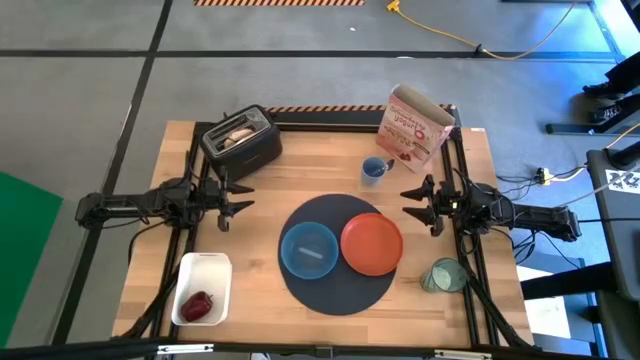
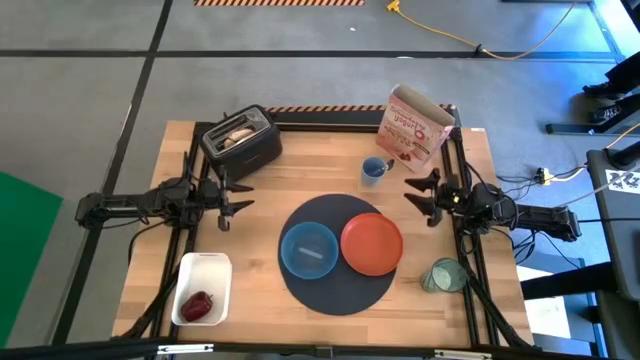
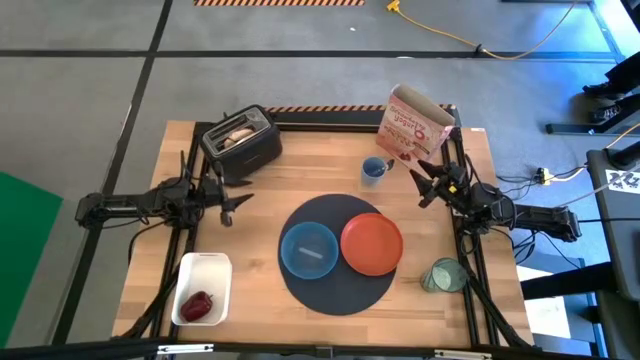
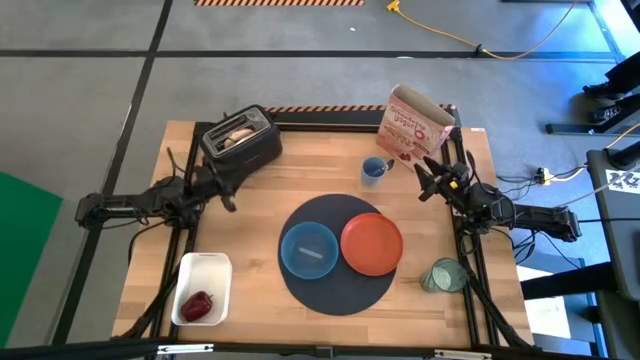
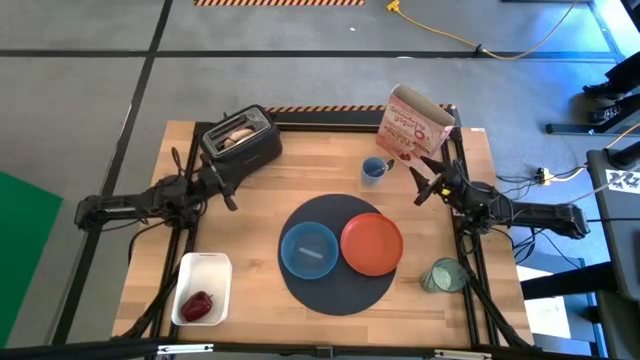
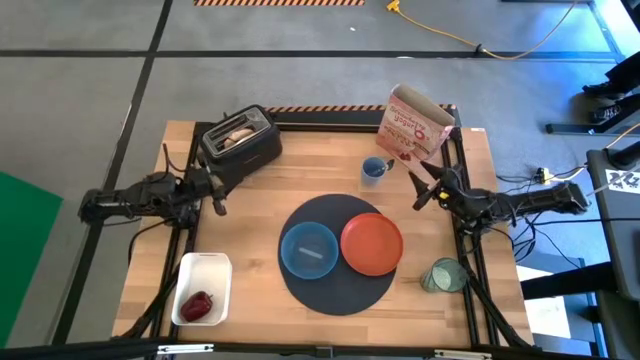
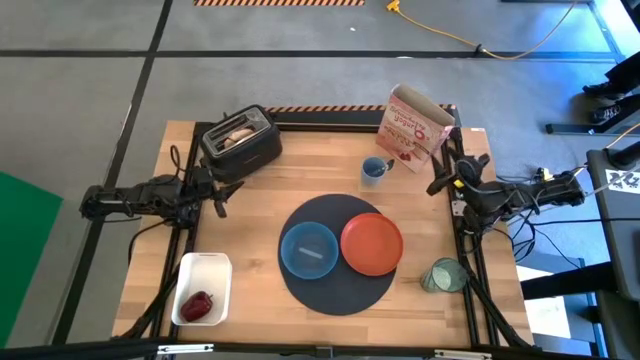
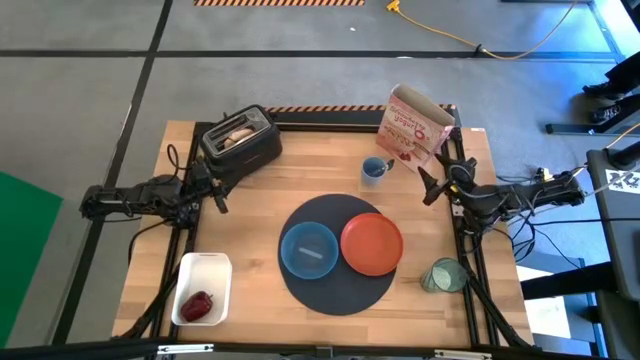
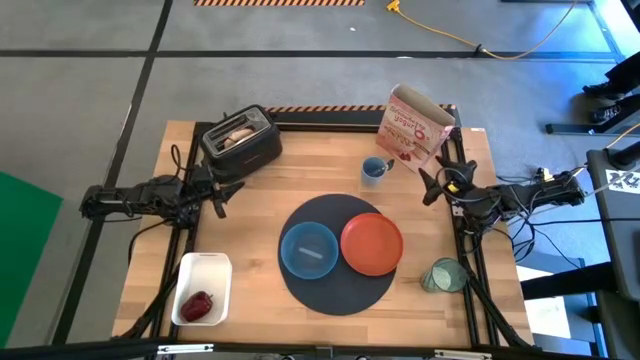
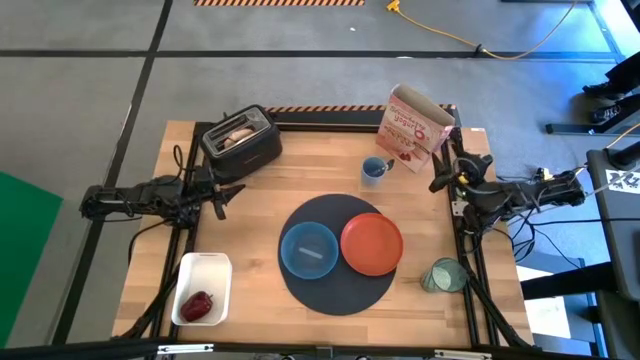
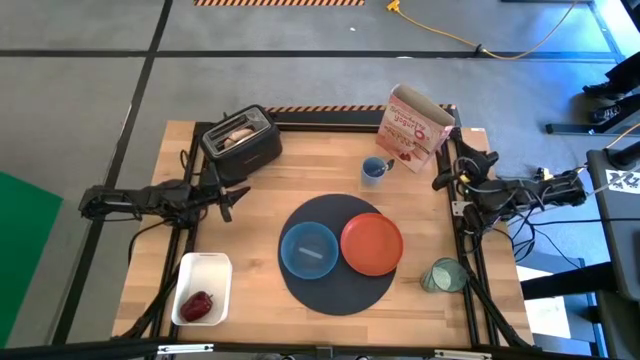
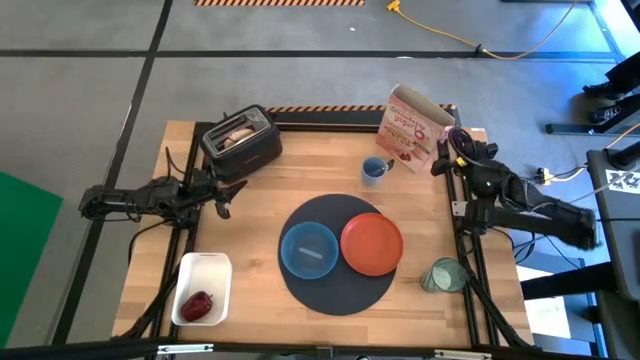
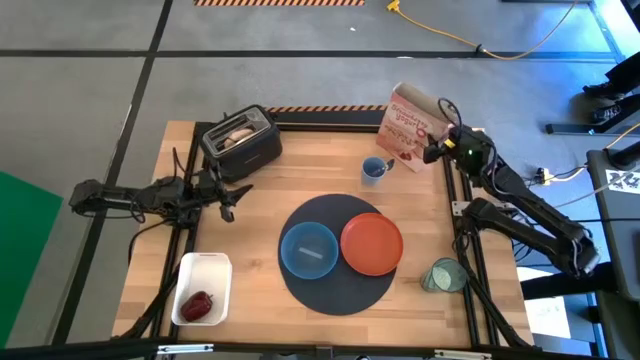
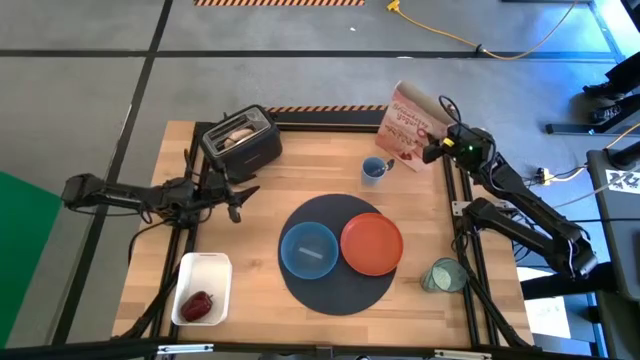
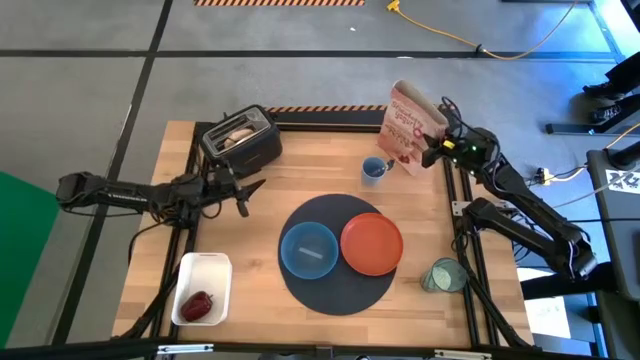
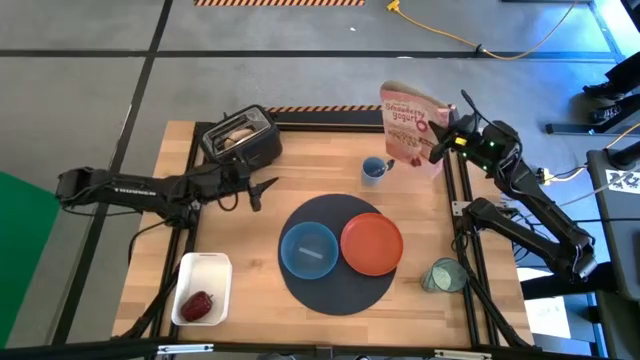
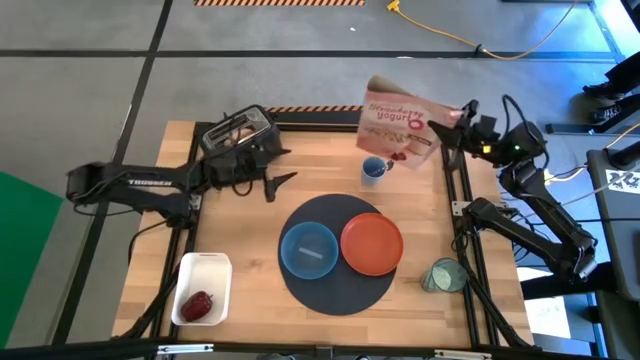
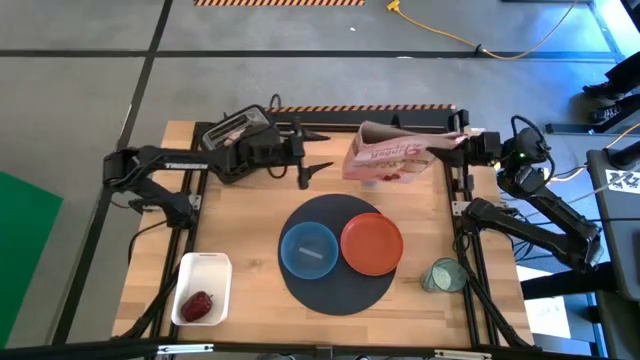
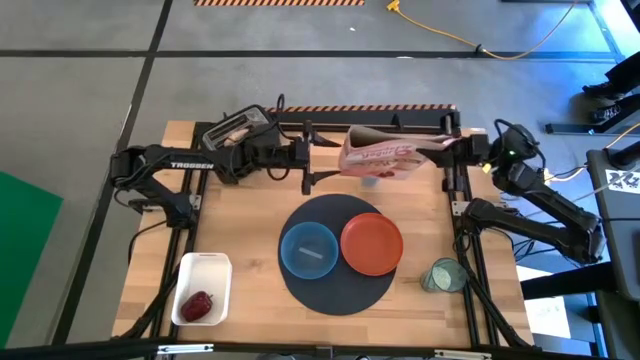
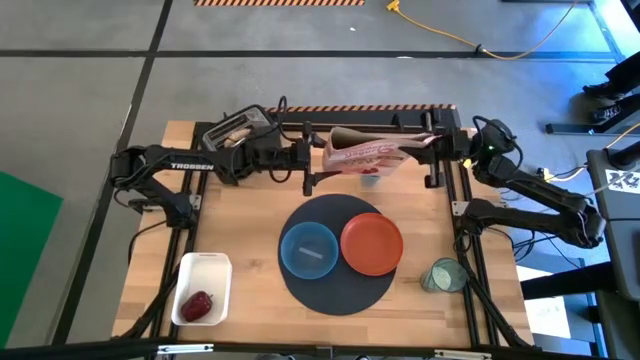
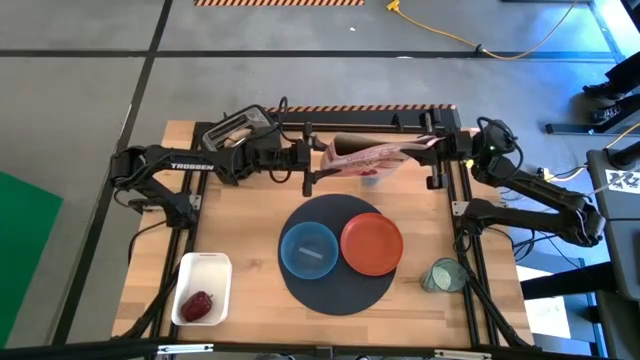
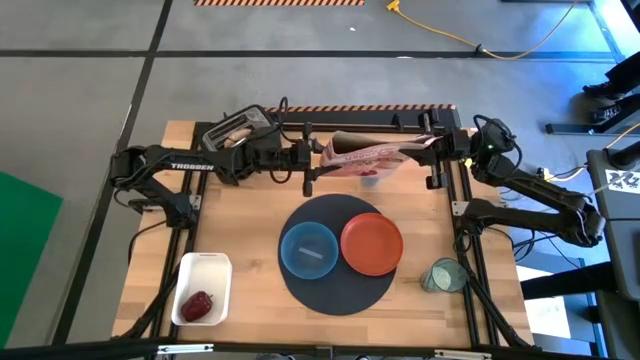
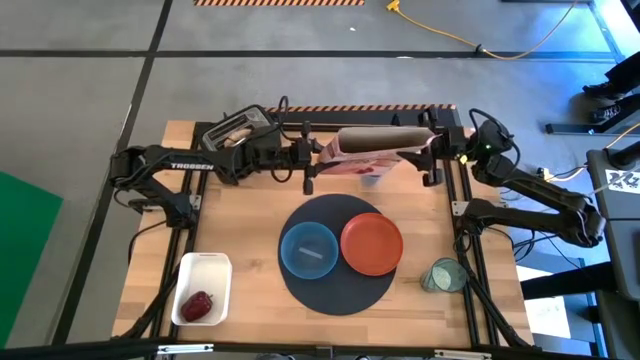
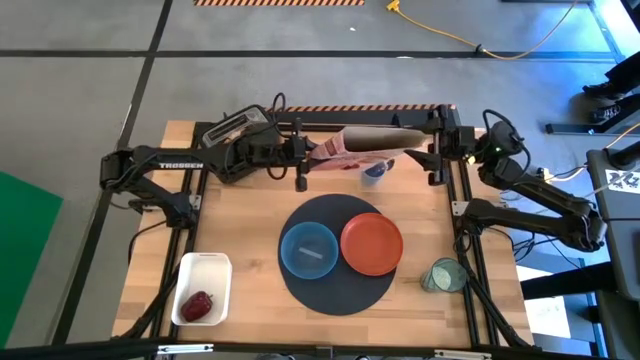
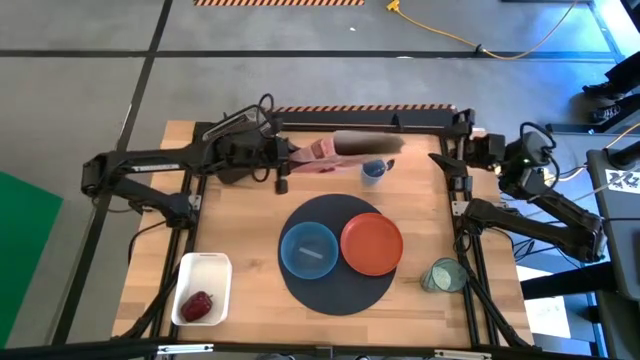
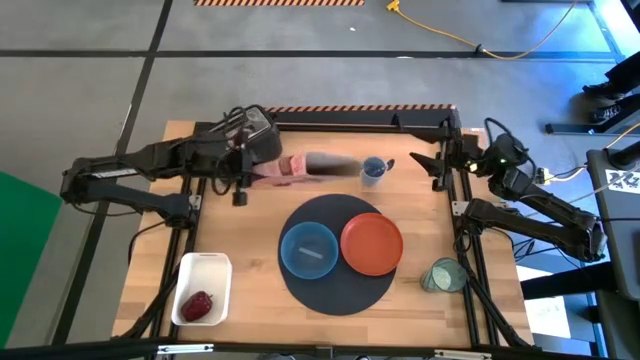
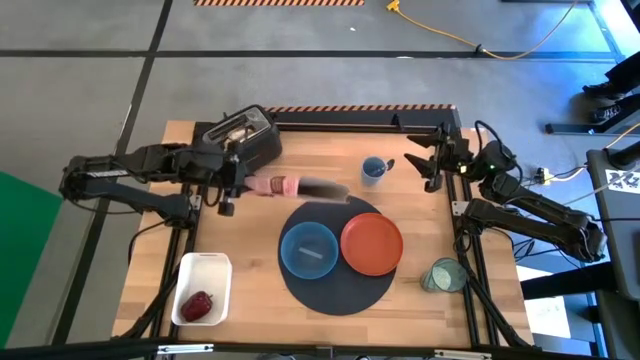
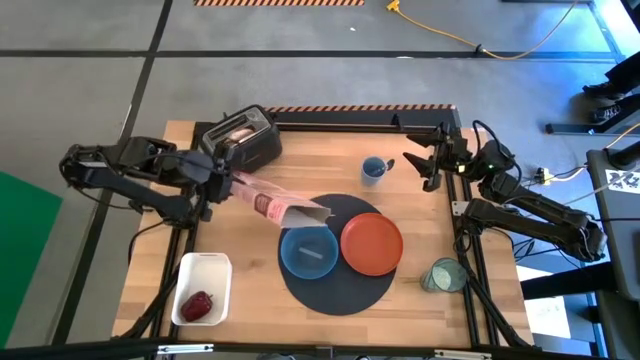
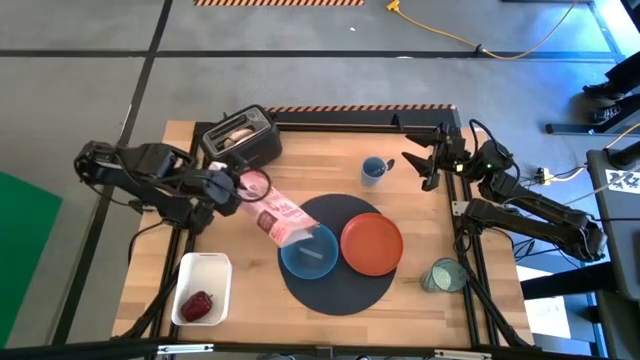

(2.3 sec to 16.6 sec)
Task: Arrange a breakfast setting
Pour the cereal from the box on the blue bowl

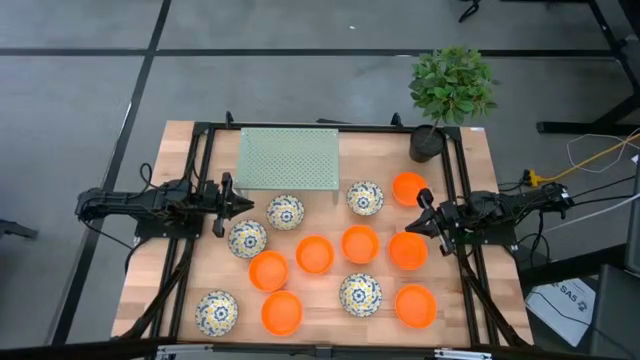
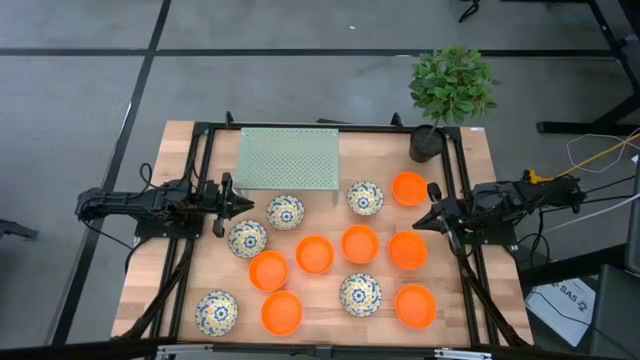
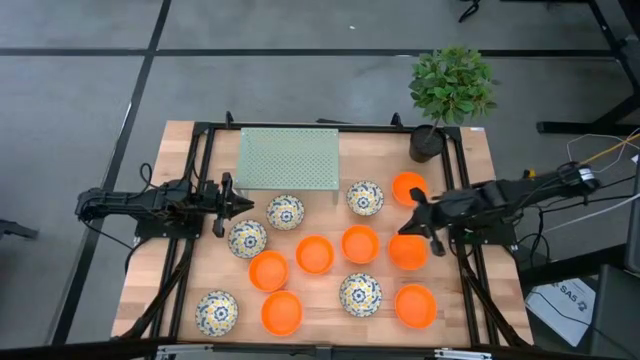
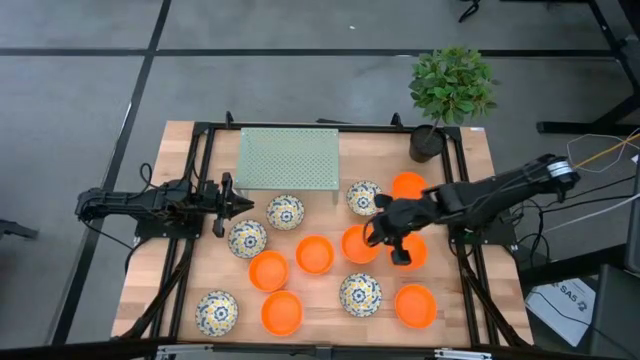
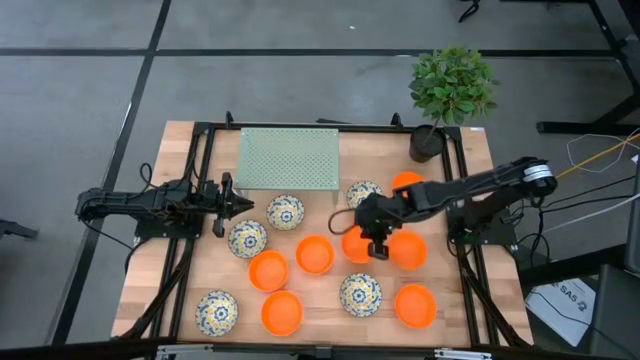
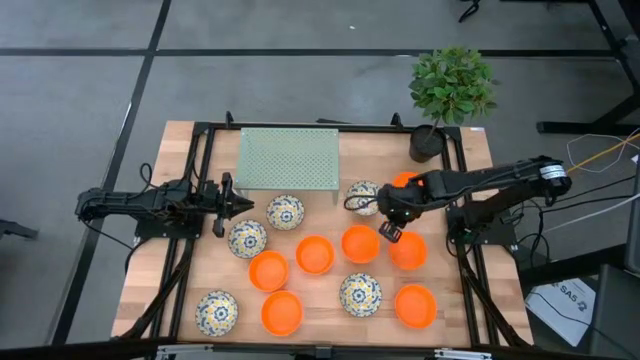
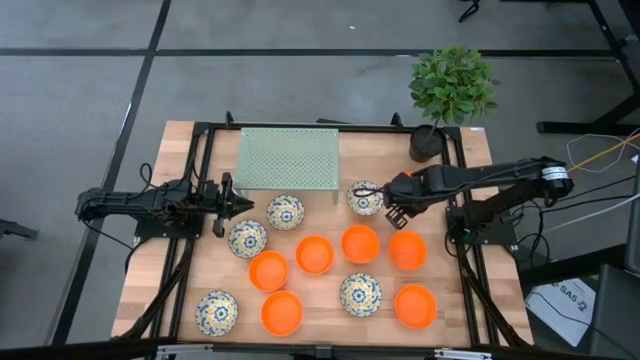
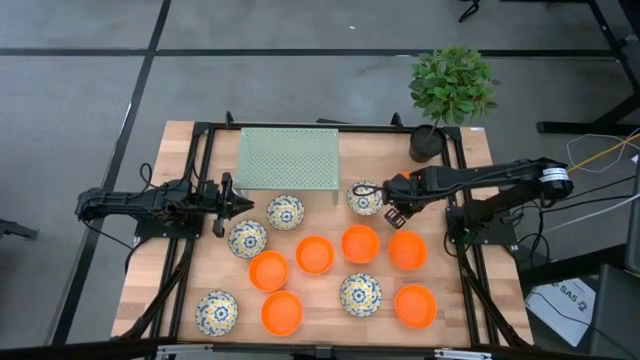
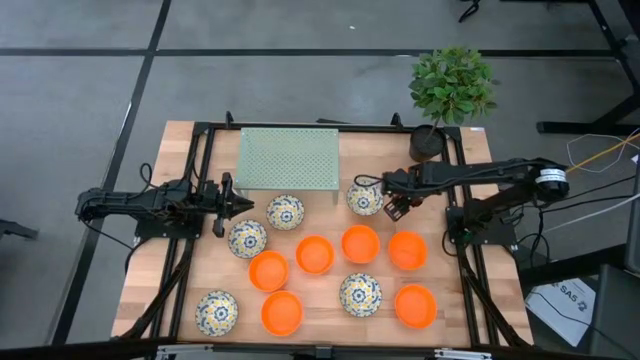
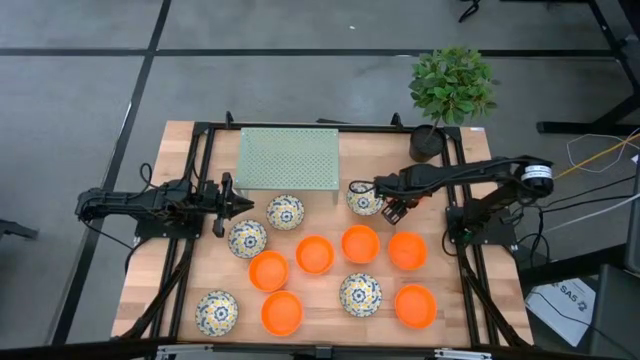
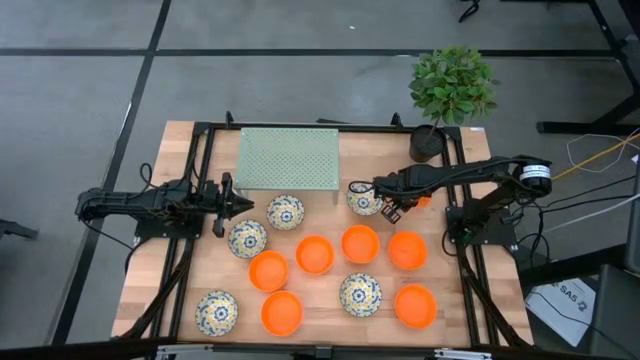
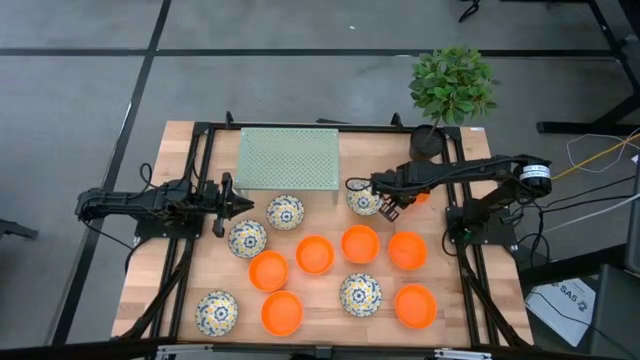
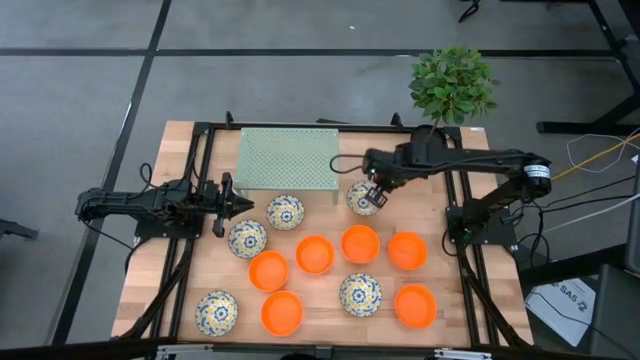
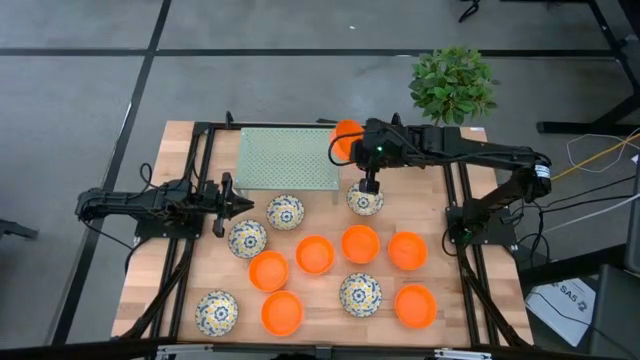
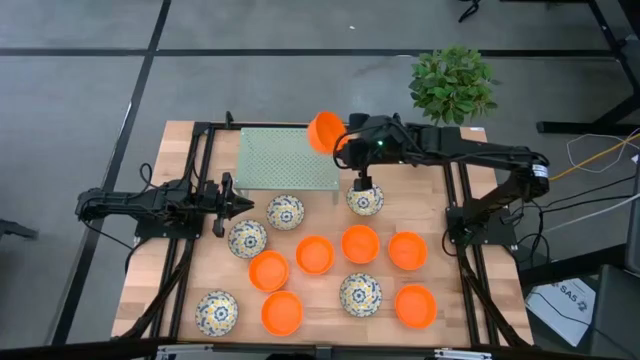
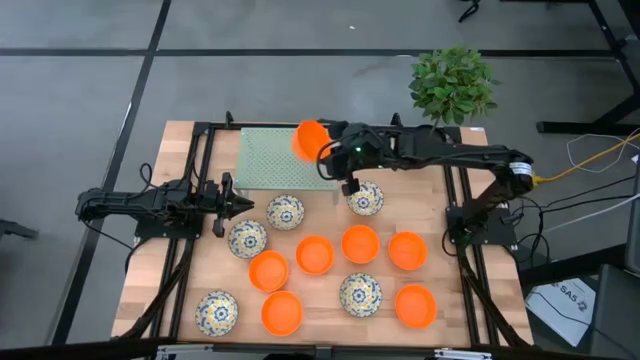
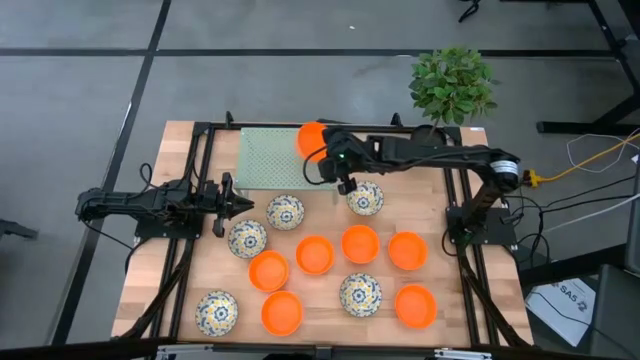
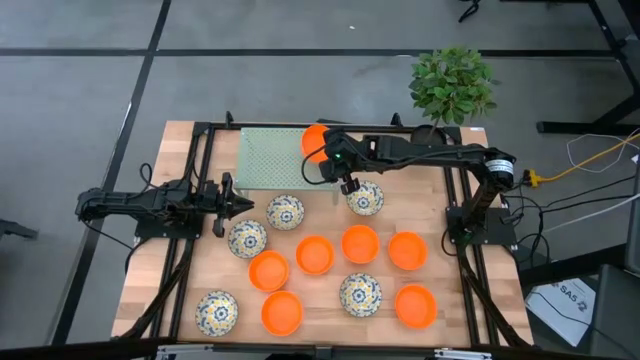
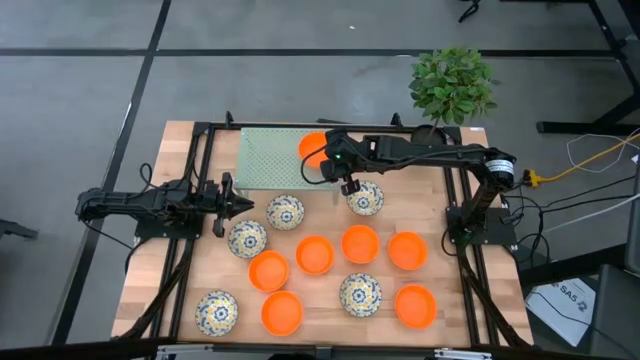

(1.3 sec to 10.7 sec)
Task: Pick & Place Mini bowls
Put the orange bowl on the shelf
